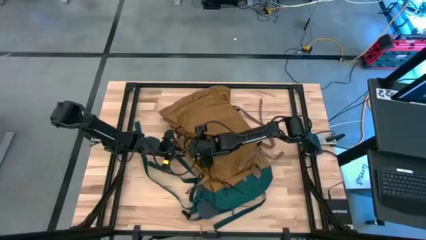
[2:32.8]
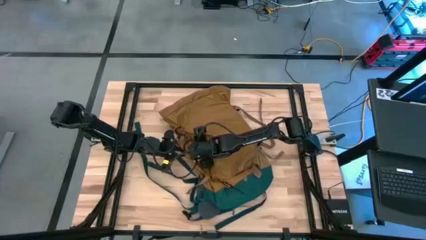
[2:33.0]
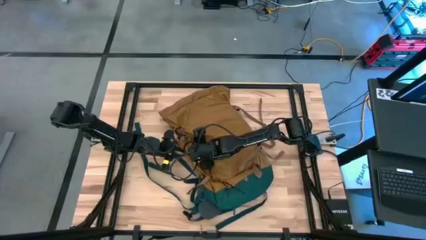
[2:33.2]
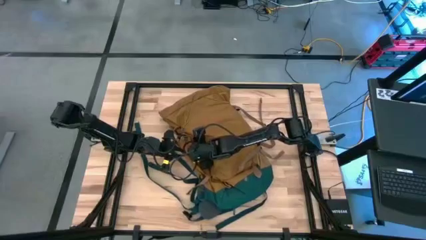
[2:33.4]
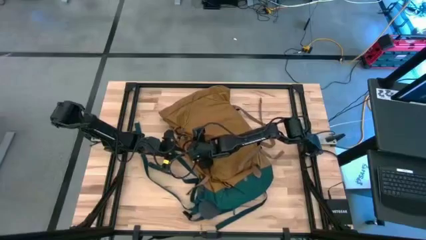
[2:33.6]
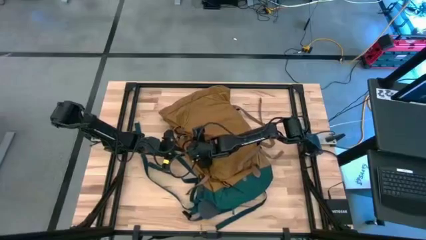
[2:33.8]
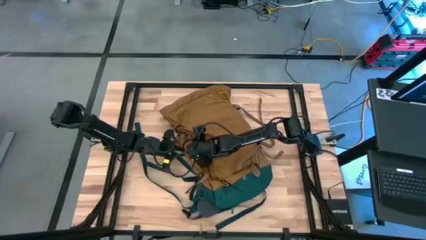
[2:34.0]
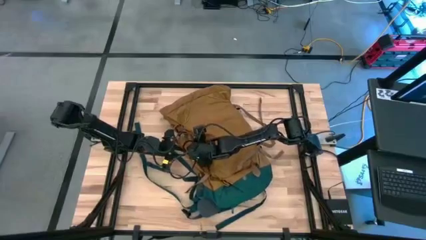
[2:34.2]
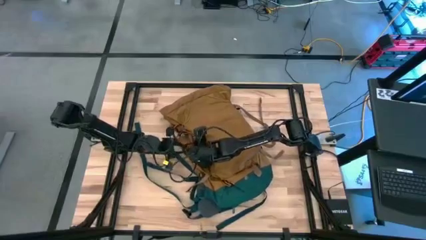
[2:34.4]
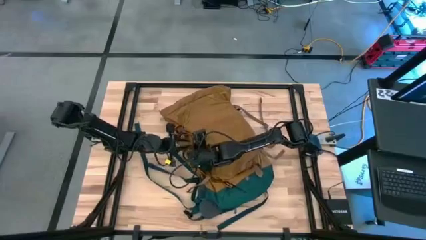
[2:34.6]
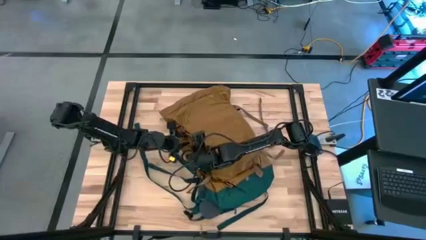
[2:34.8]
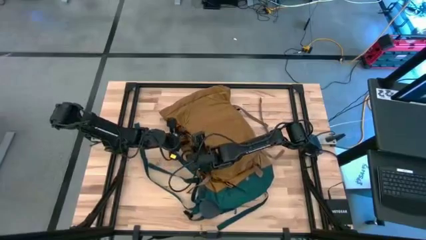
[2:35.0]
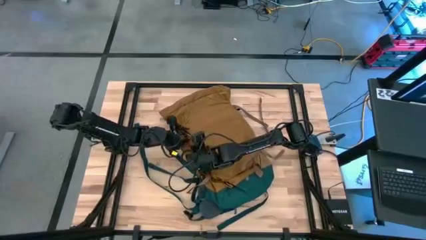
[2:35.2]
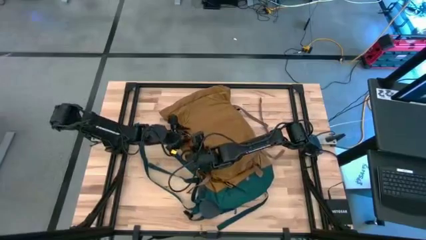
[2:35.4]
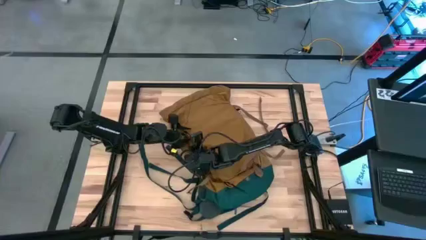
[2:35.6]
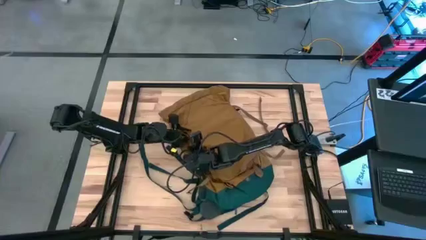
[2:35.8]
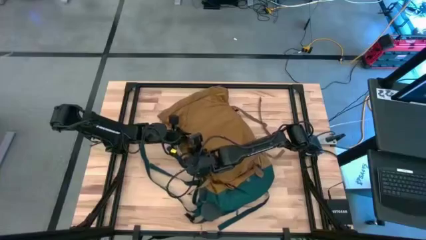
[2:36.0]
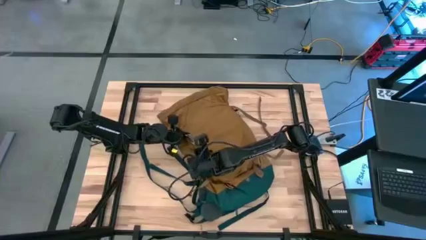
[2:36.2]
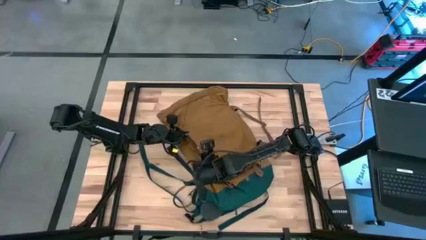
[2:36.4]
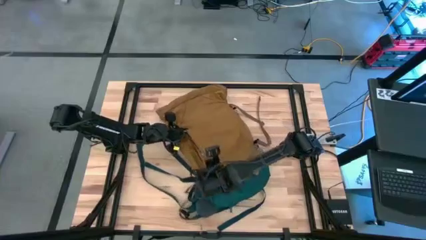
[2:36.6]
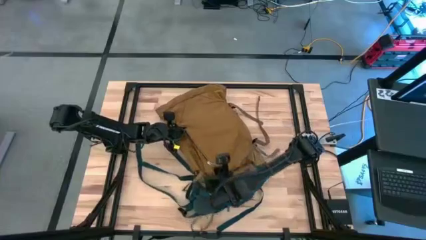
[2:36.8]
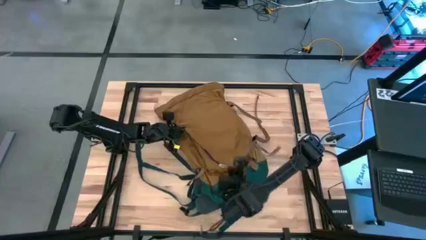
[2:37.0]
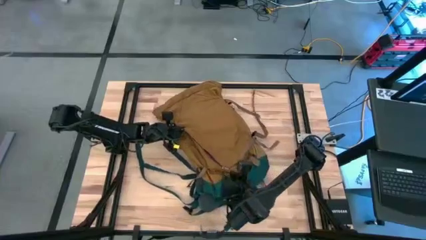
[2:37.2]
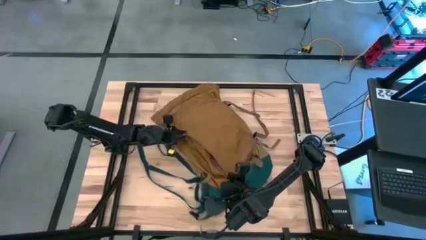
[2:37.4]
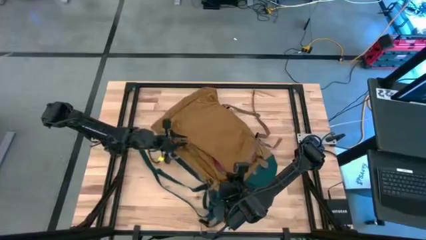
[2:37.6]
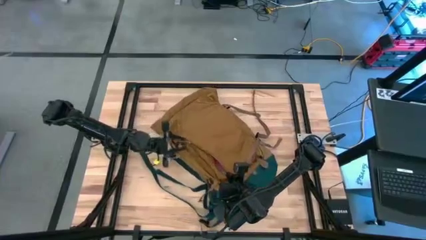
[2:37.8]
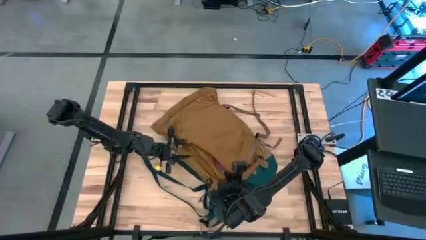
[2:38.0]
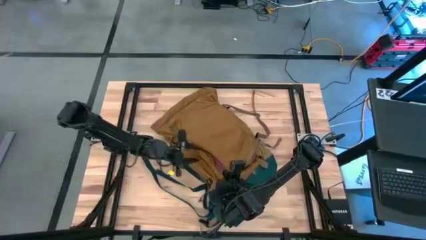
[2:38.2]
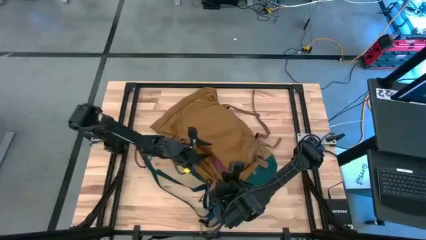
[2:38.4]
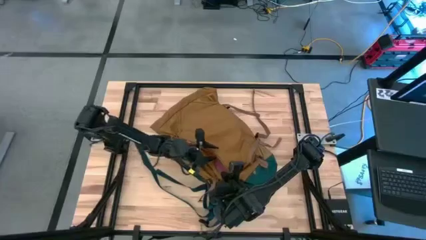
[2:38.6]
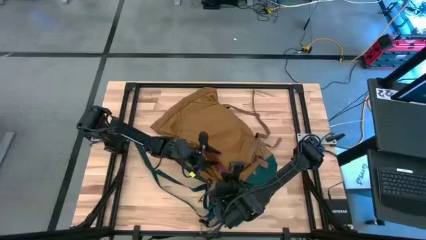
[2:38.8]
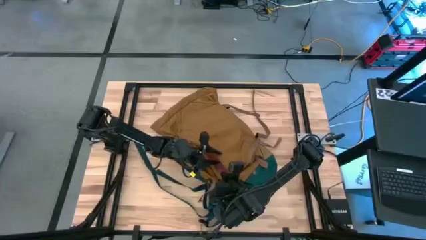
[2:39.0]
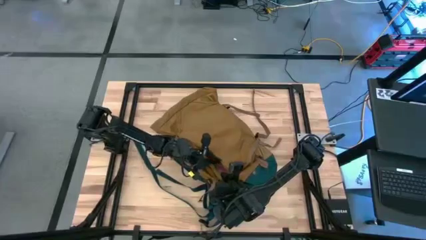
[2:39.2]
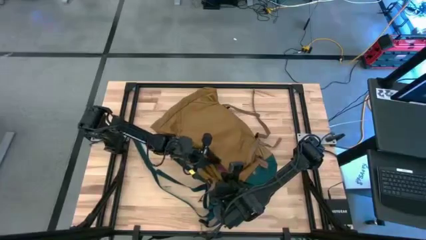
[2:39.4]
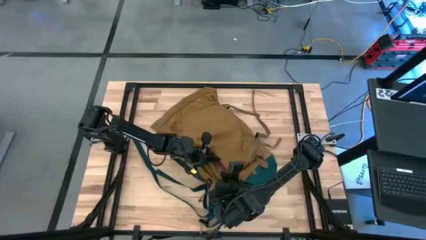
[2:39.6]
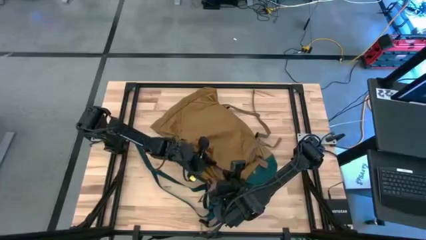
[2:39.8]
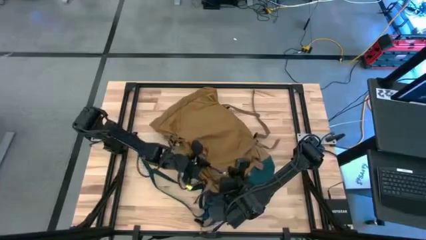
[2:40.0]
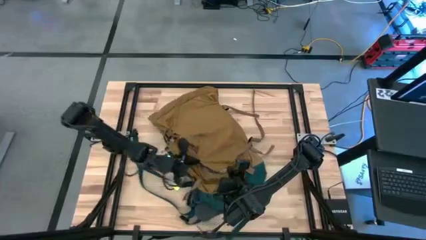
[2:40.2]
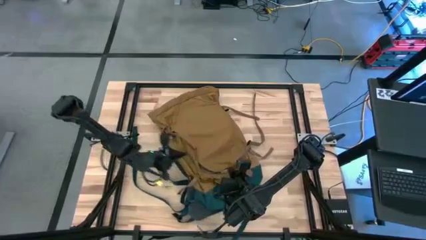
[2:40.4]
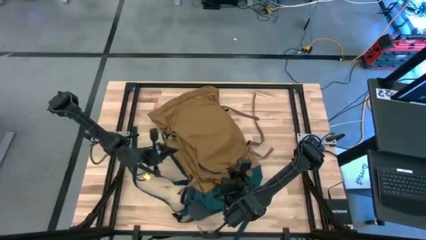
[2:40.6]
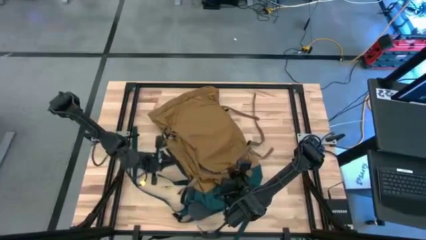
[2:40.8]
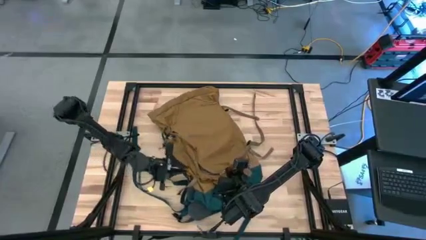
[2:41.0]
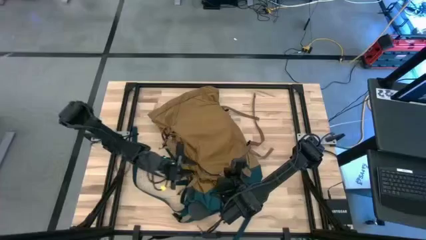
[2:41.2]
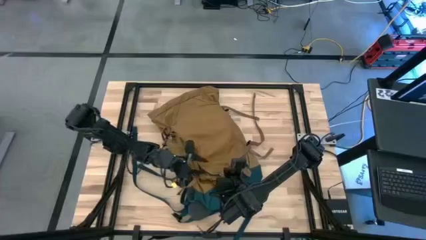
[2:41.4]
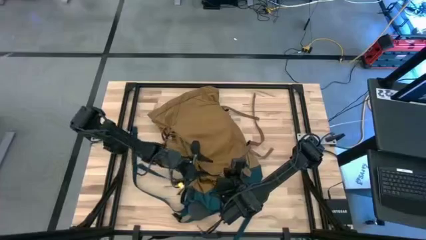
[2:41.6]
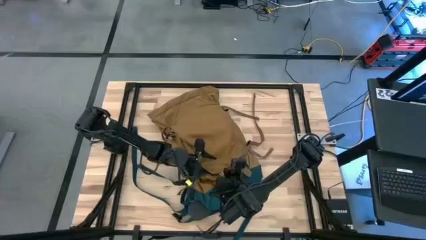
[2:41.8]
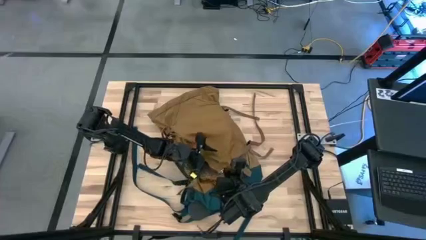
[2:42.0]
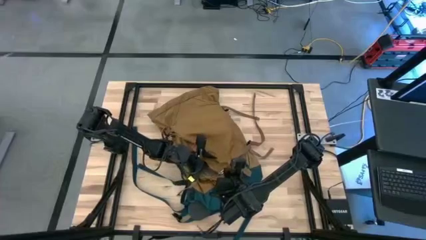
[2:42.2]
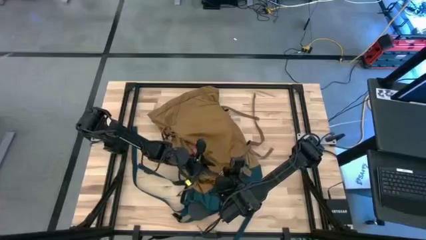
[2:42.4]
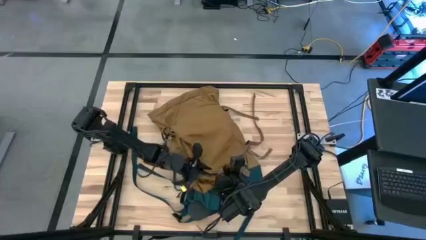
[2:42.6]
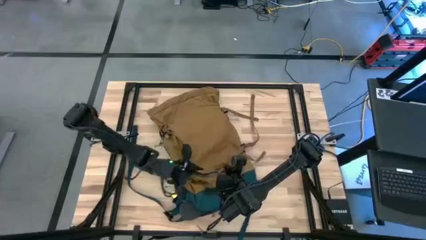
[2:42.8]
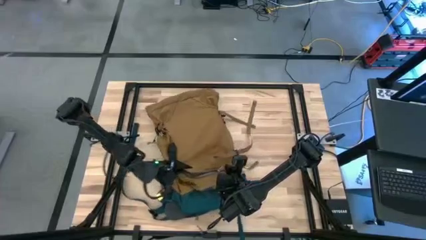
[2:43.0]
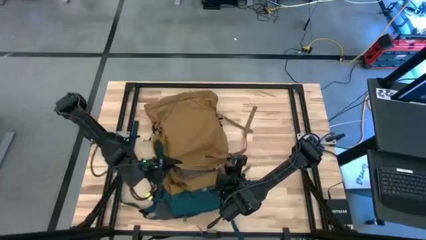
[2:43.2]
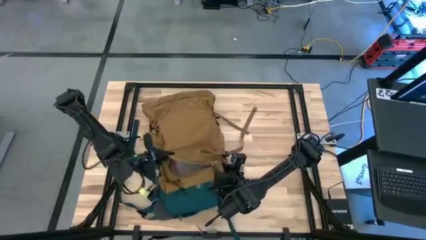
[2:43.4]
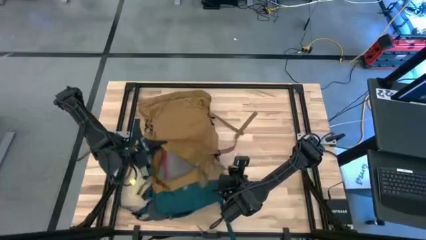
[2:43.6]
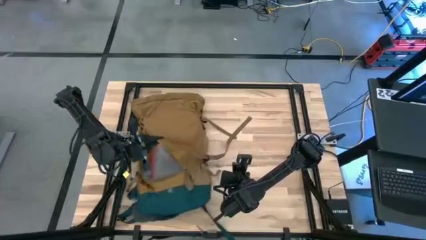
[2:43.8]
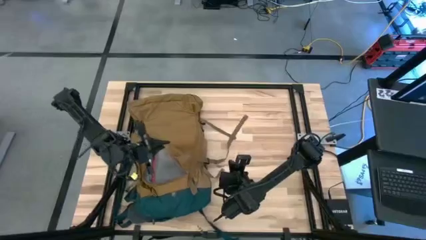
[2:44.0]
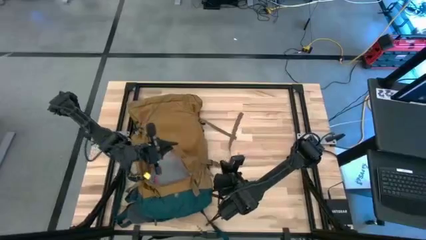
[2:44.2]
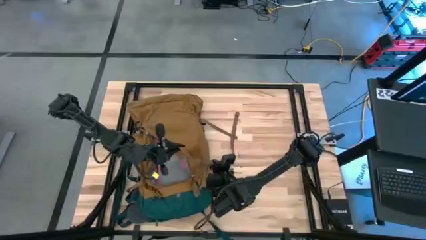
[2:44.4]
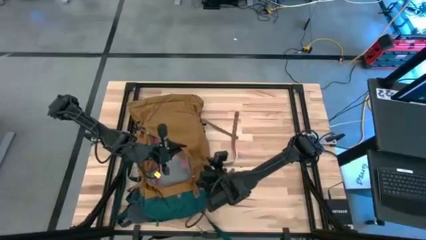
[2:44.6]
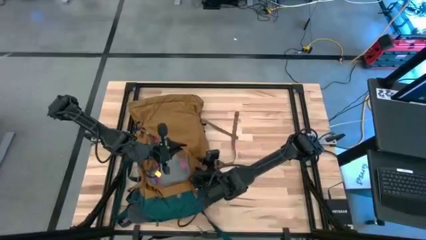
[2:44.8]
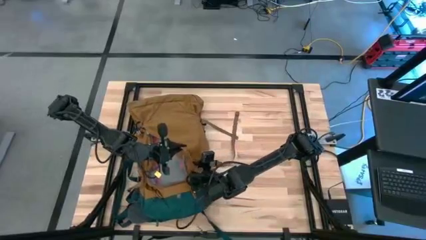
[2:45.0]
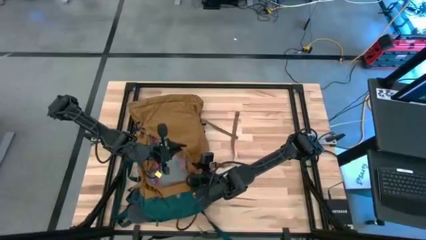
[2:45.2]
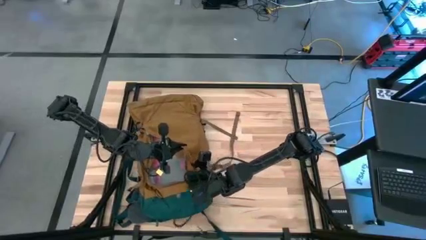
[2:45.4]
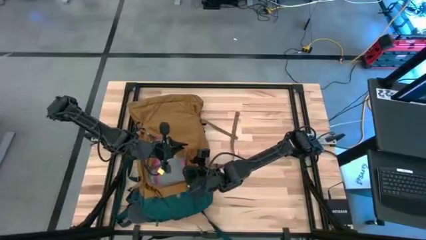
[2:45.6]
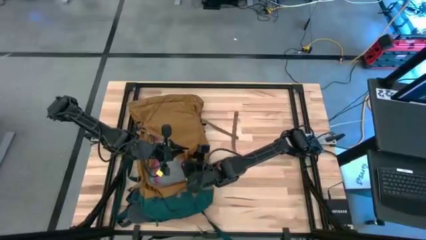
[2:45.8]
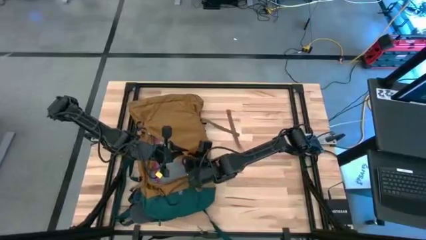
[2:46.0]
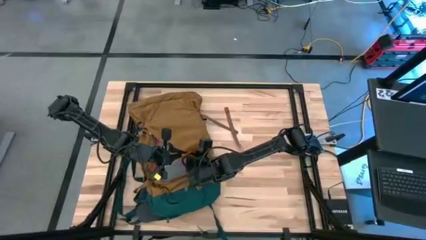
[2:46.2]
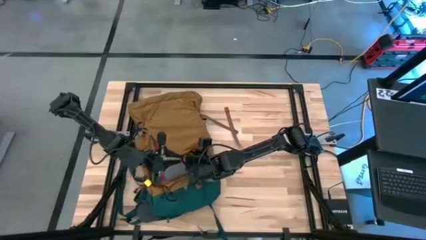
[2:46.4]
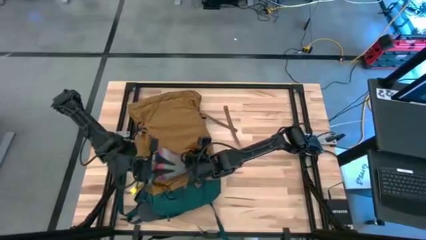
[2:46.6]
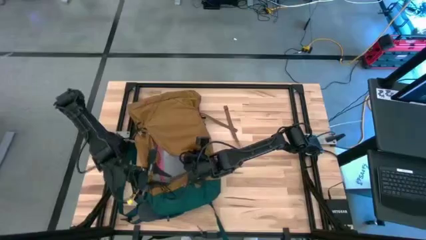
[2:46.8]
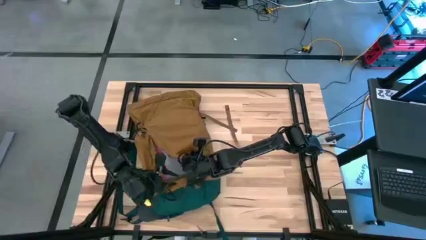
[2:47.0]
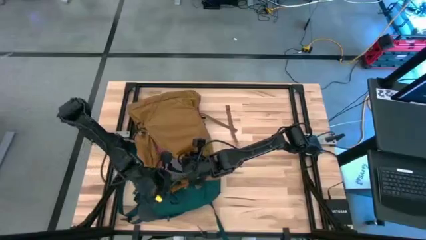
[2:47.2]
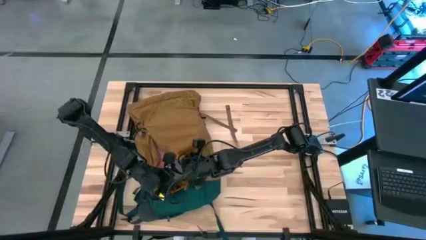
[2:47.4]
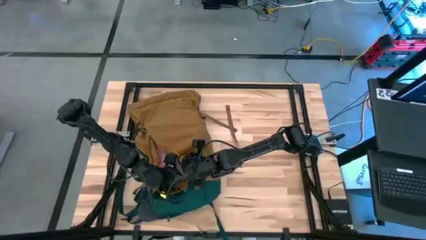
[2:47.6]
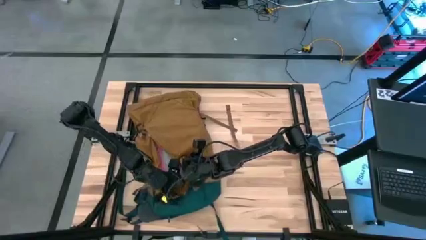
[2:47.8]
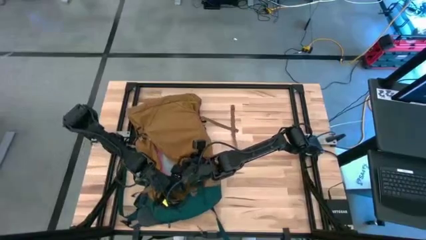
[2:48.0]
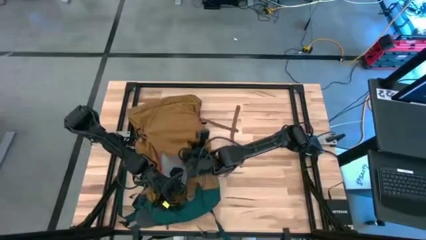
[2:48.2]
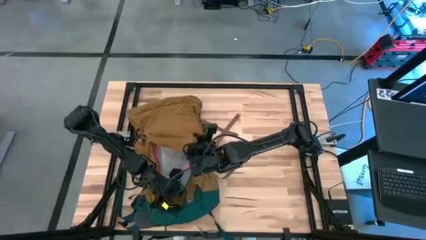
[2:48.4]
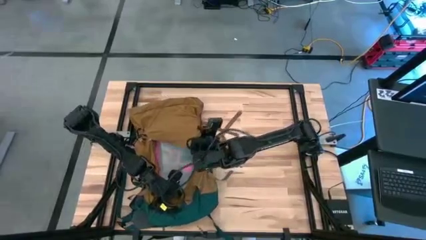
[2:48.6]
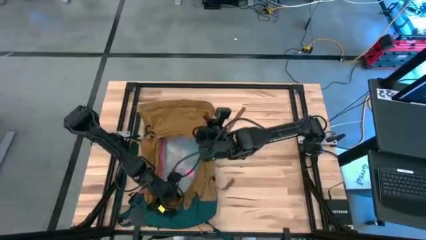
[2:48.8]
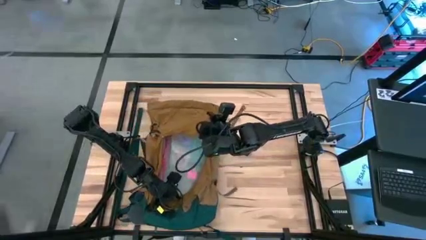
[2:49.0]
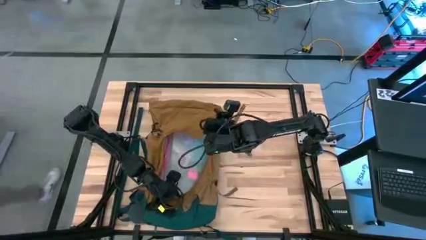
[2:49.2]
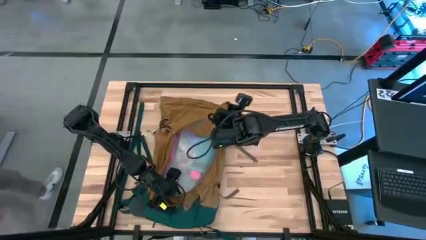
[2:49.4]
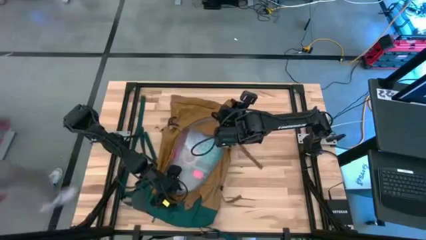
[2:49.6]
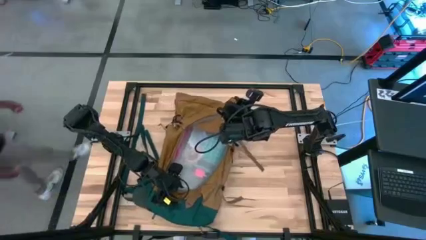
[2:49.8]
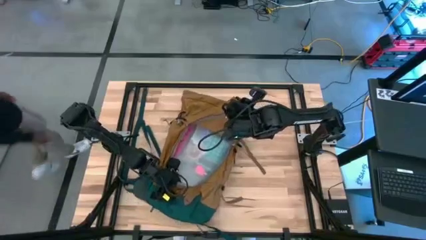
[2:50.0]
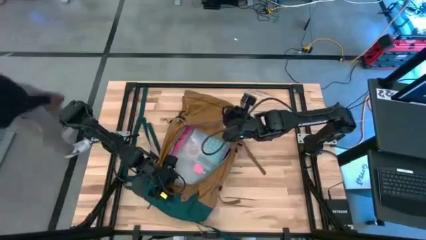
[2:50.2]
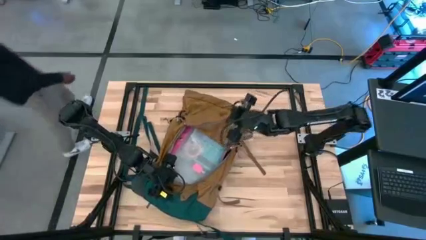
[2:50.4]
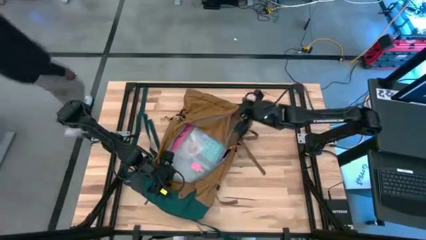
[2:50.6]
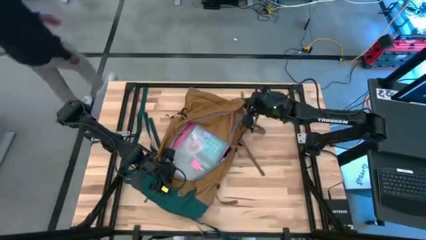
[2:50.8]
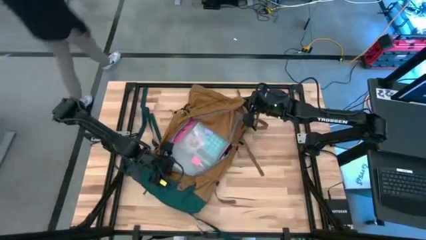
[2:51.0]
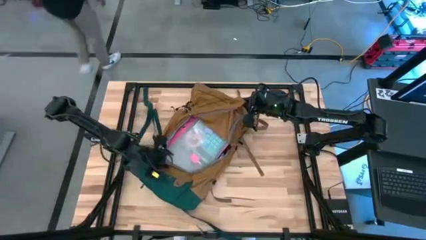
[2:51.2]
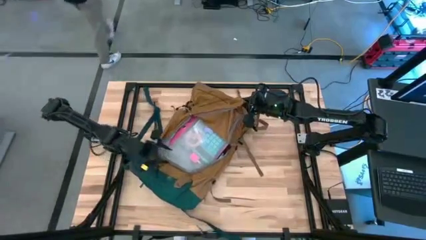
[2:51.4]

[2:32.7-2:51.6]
Task: Unpack backpack
Open the brown backpack
